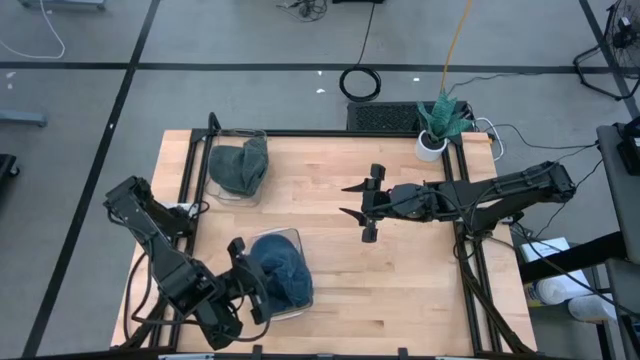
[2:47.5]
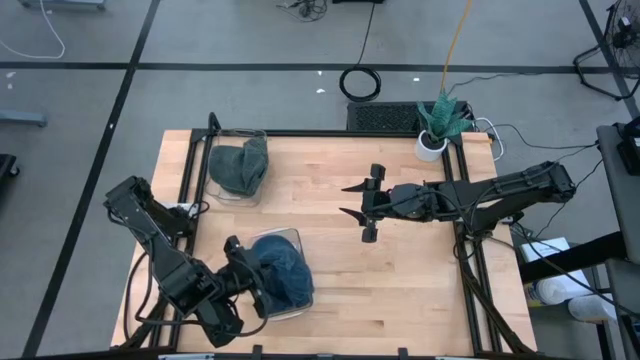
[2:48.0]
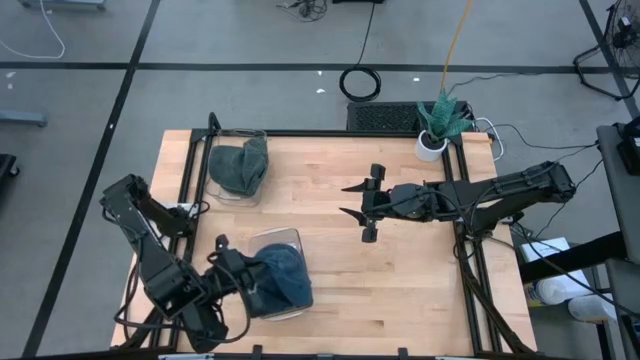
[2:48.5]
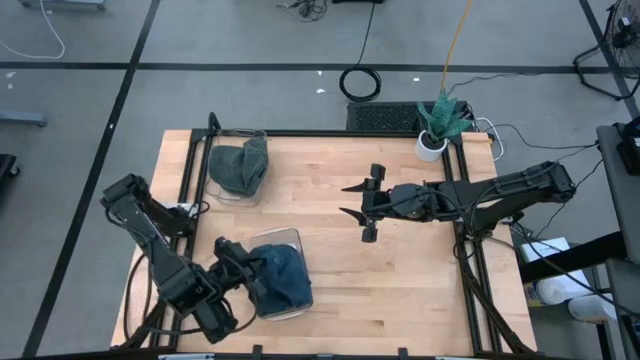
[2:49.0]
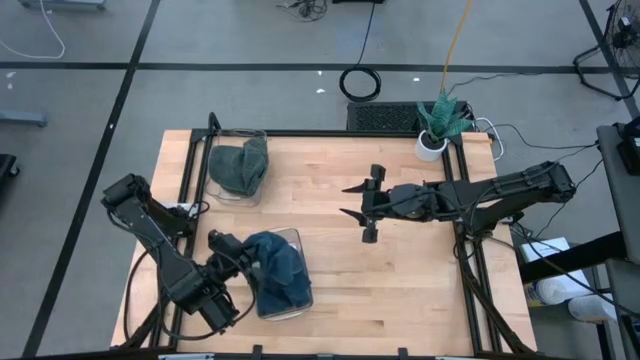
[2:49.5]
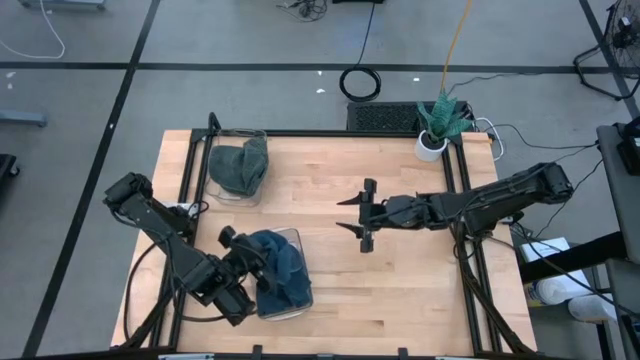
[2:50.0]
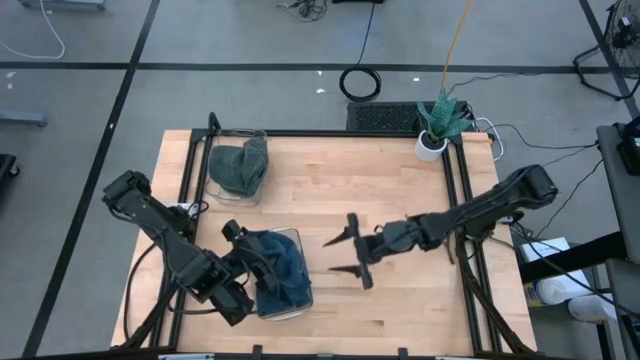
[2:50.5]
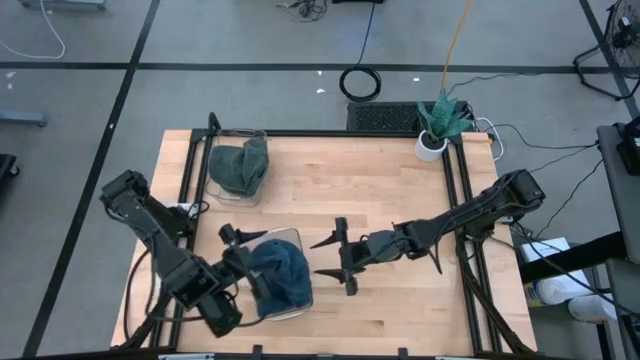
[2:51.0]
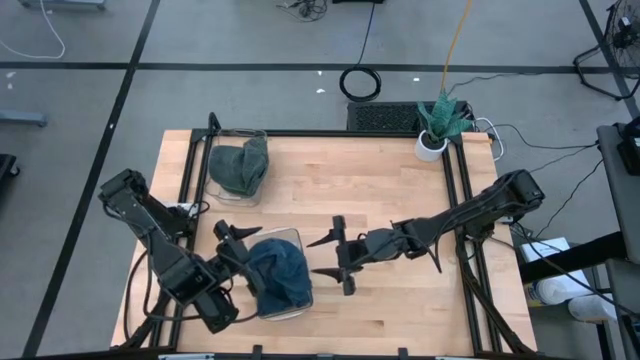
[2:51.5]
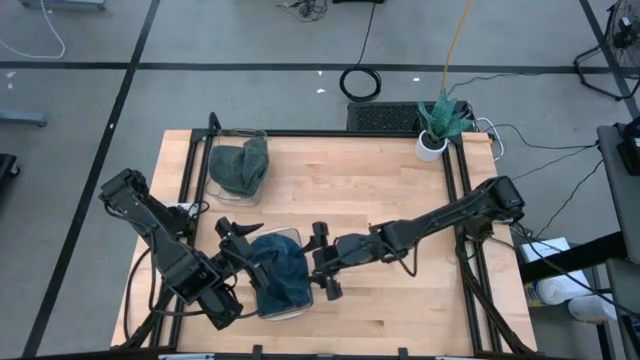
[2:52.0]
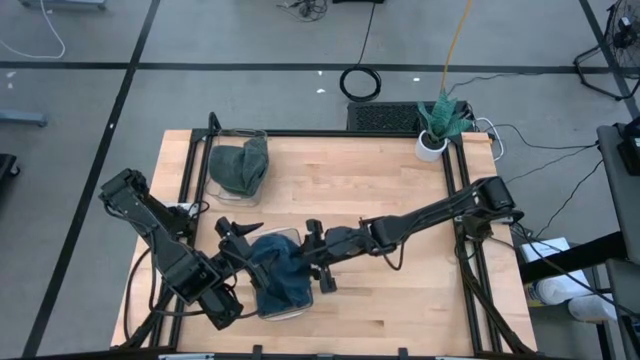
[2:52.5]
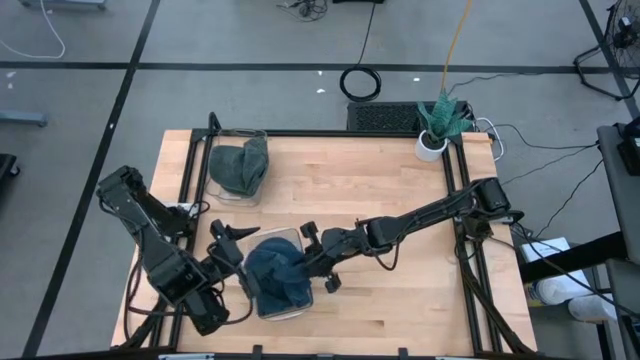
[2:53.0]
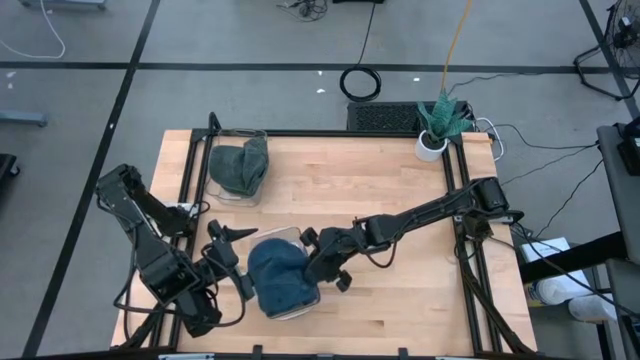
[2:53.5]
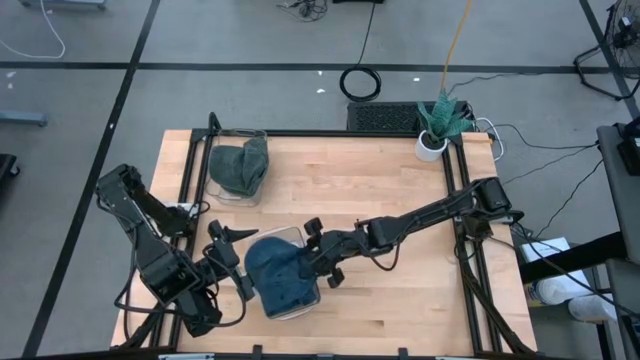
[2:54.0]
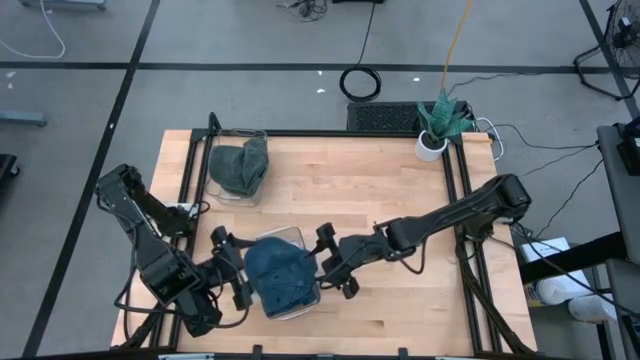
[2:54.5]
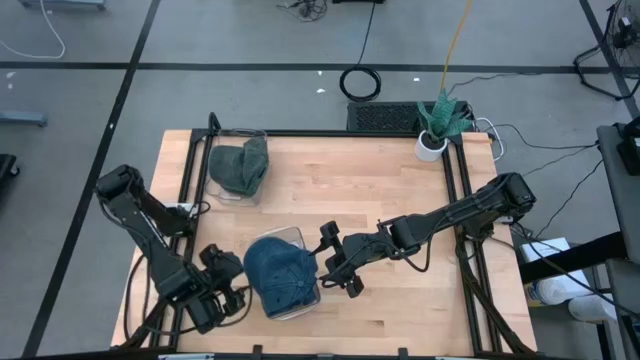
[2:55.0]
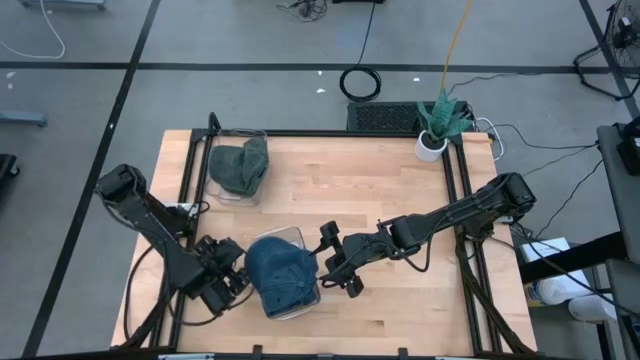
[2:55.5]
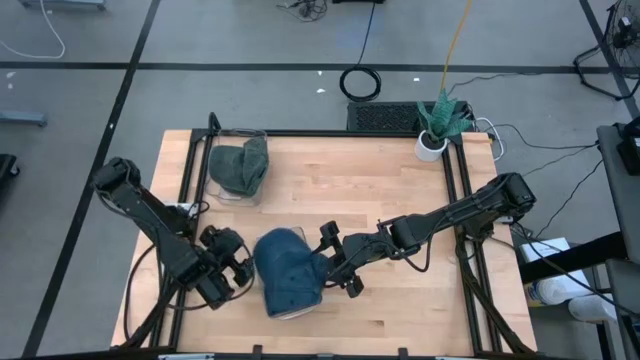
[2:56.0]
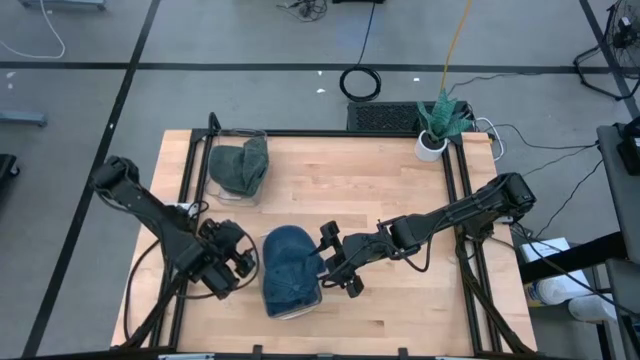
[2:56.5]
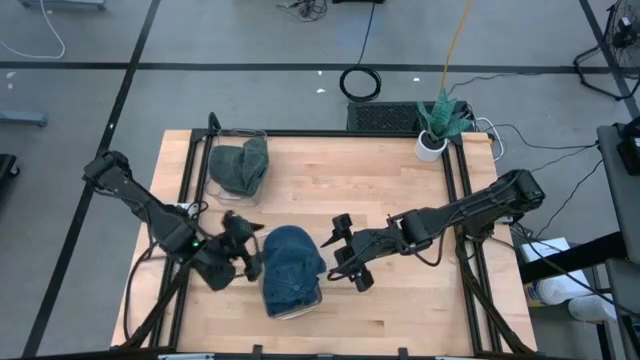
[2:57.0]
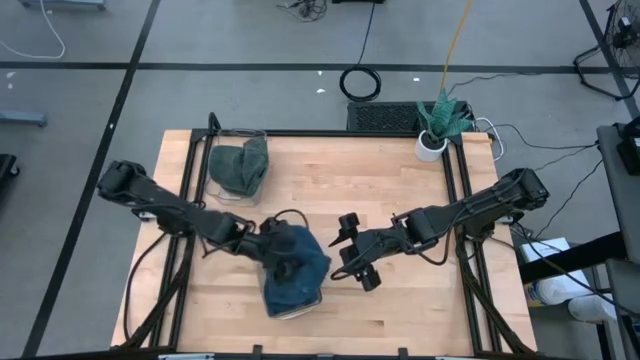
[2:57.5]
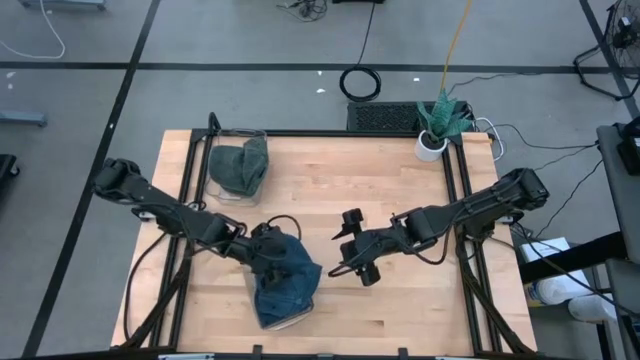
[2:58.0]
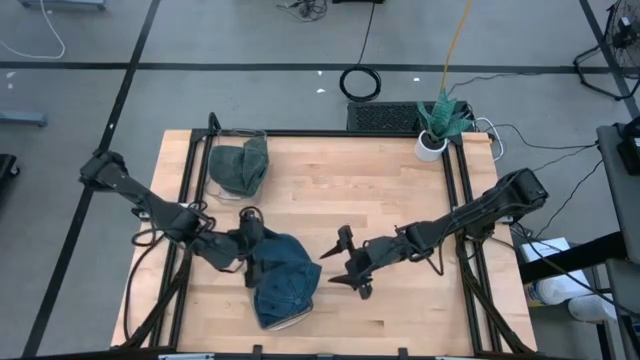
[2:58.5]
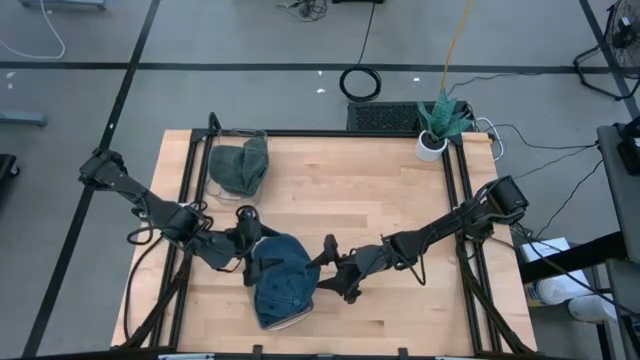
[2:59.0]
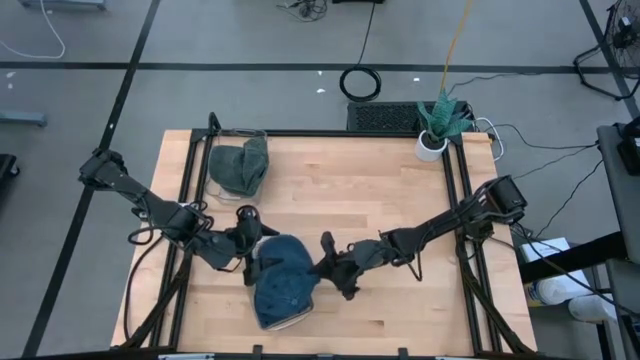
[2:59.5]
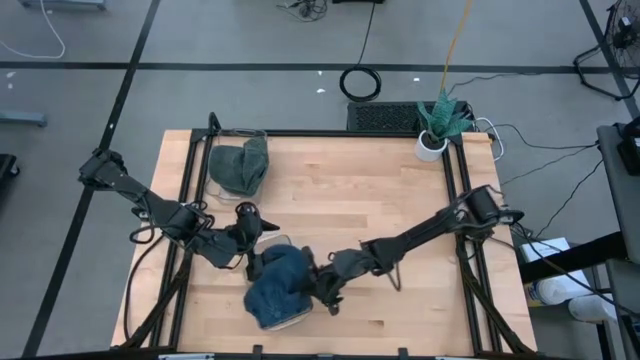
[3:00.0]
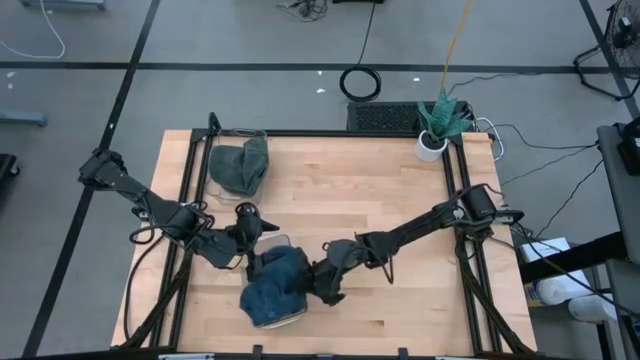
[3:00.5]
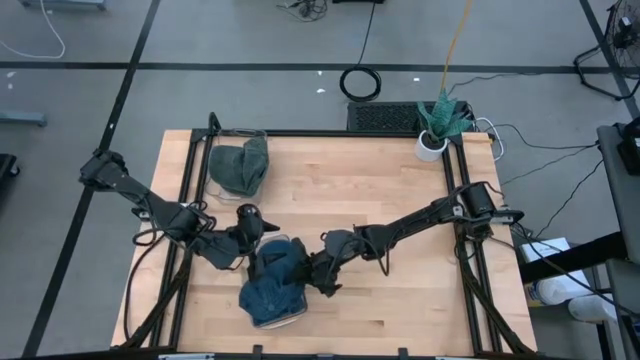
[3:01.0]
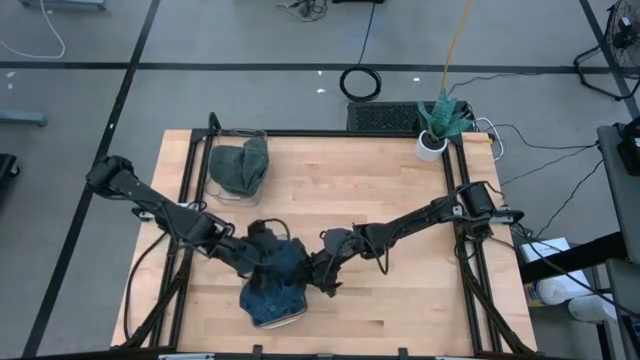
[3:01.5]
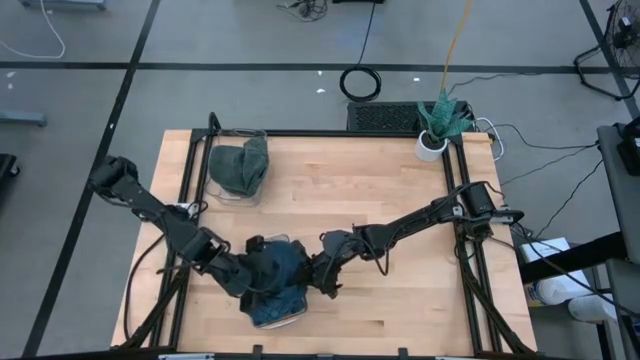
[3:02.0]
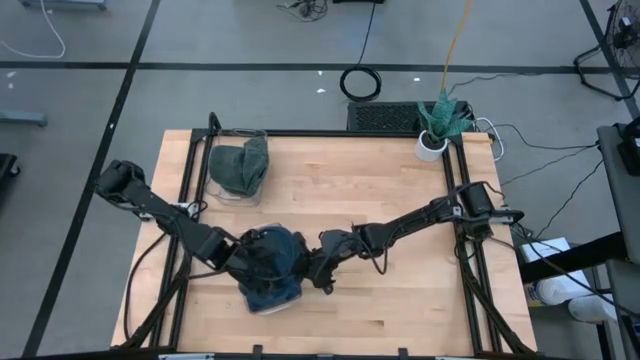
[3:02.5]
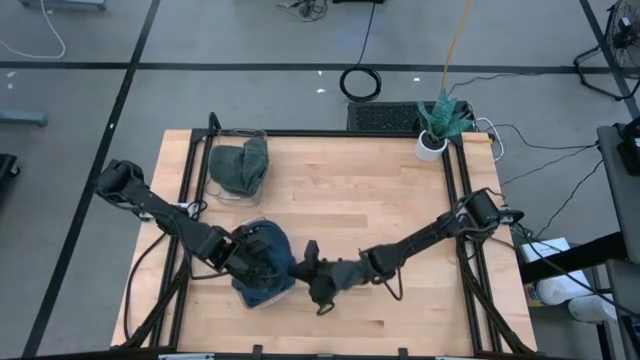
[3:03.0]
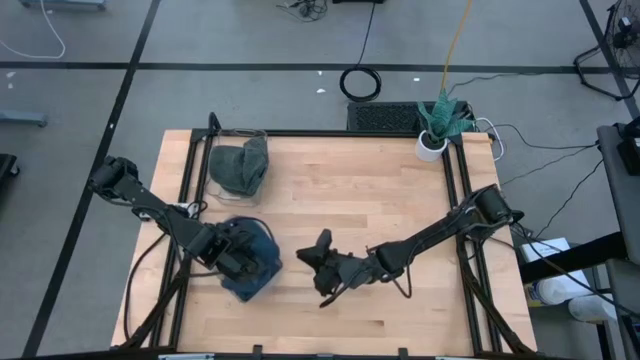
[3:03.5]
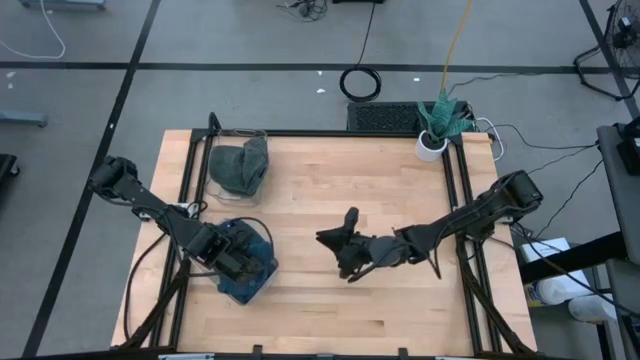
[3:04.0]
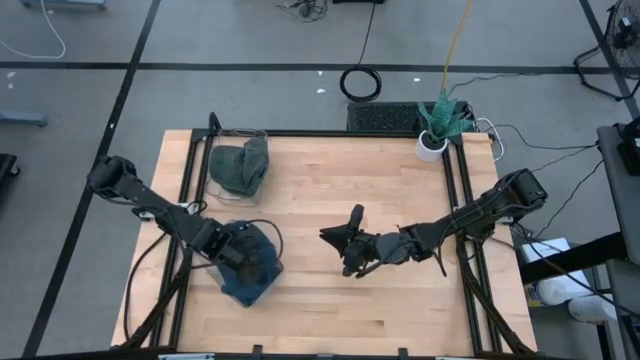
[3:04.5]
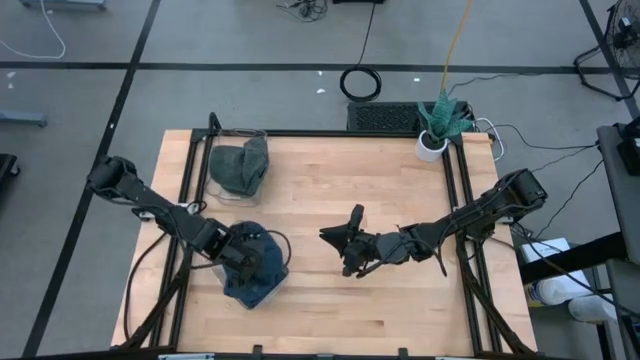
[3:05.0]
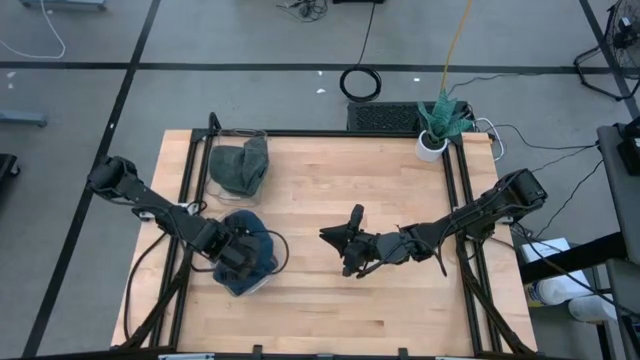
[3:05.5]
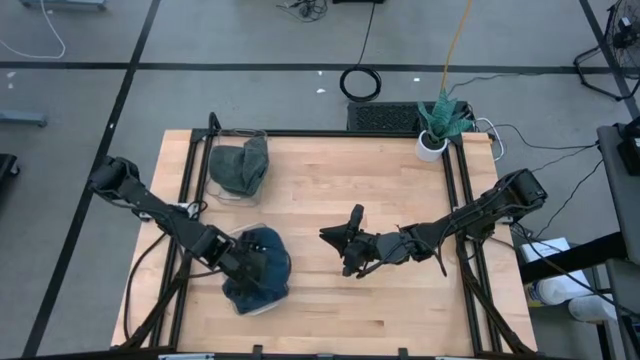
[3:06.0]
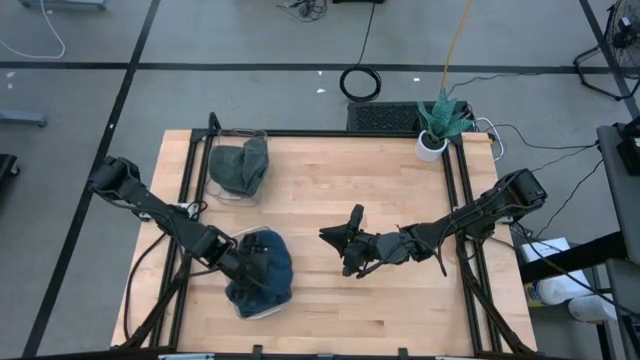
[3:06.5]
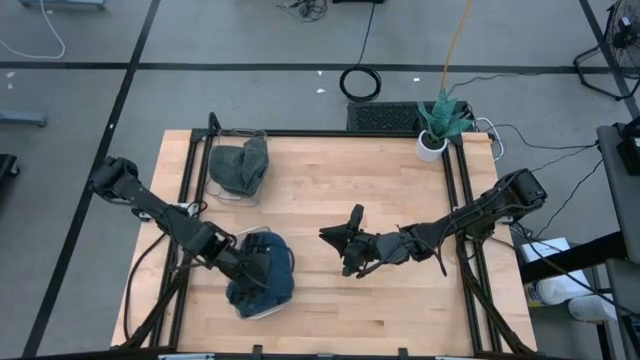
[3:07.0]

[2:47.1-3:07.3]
Task: Pick & Place hat
Put the blue cap into the bottom transparent bin

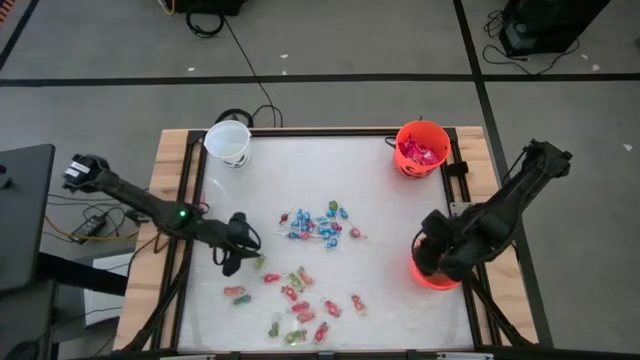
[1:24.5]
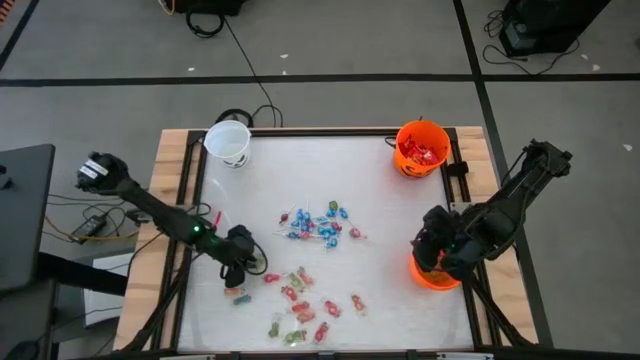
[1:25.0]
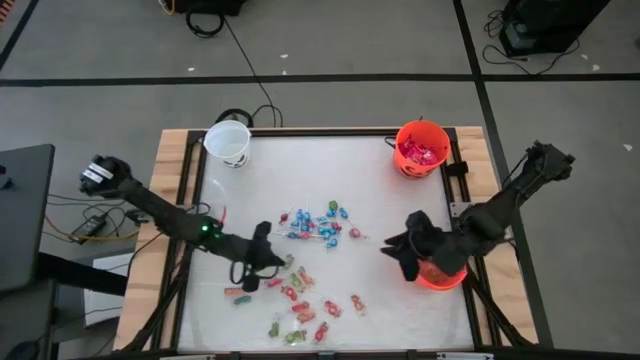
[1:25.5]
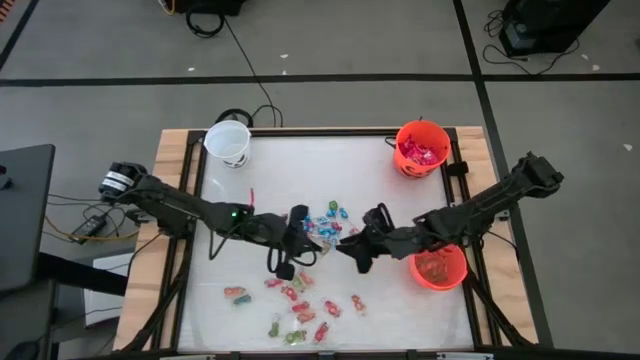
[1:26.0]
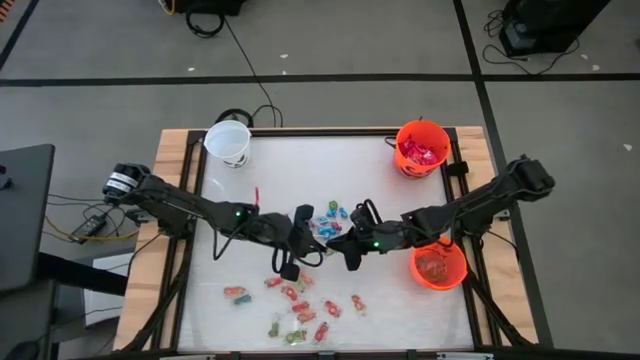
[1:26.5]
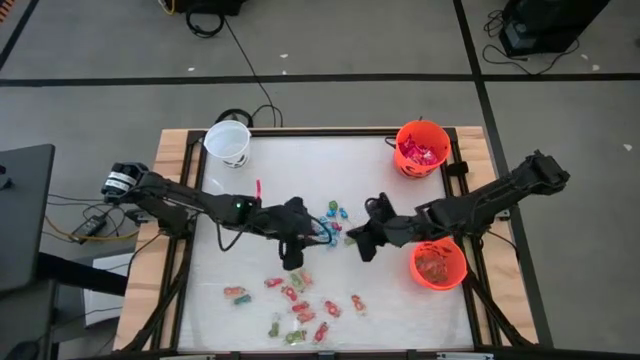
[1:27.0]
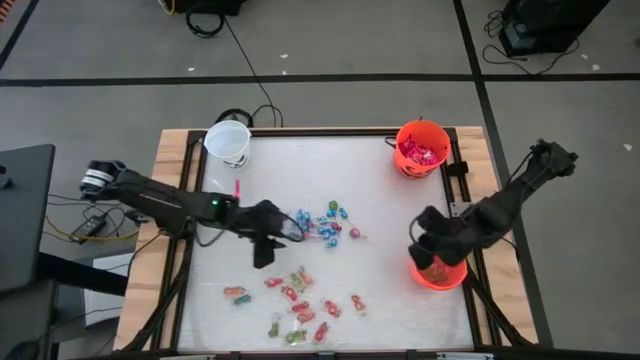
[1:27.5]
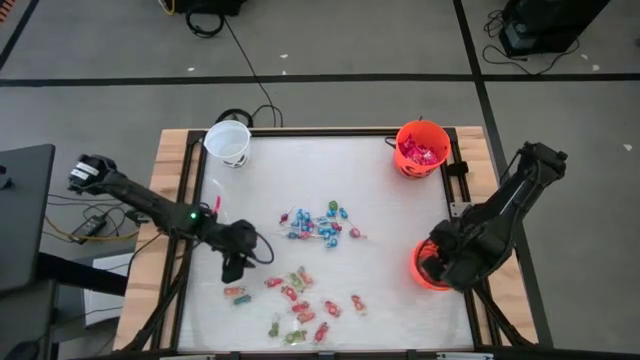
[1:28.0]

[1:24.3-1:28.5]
Task: Sort candy by brand, put in halloween buckets
Put the green gummy into the bottom orange bucket
